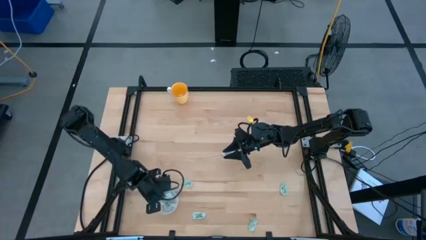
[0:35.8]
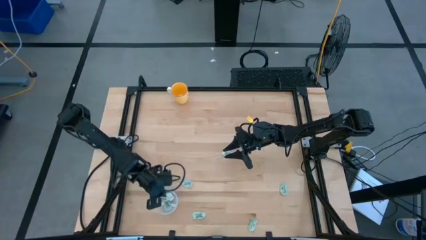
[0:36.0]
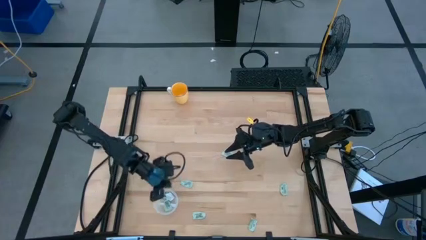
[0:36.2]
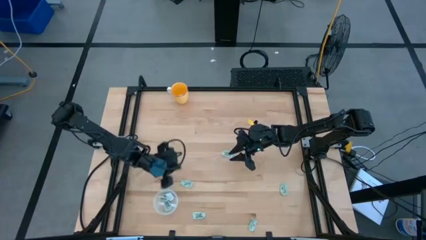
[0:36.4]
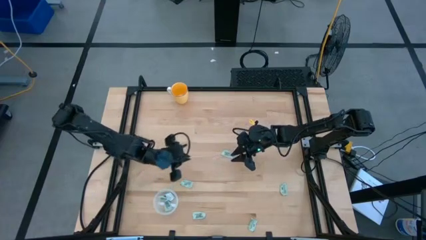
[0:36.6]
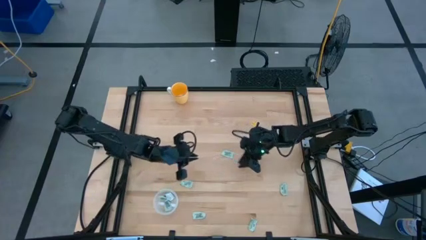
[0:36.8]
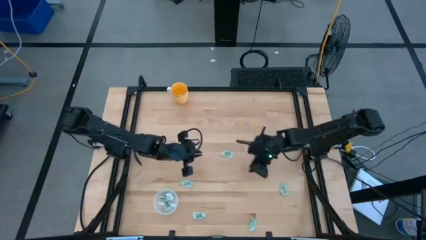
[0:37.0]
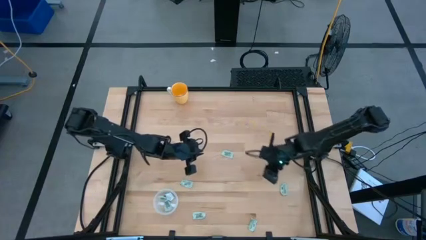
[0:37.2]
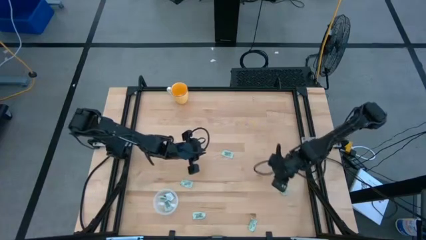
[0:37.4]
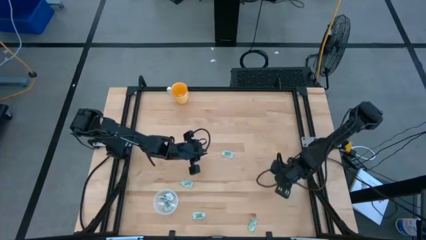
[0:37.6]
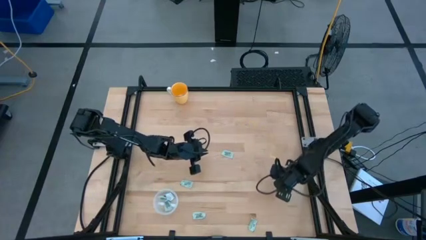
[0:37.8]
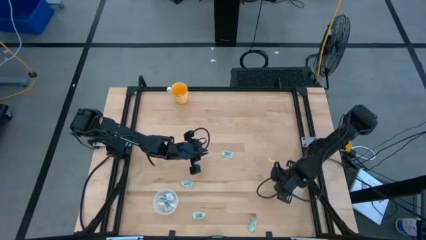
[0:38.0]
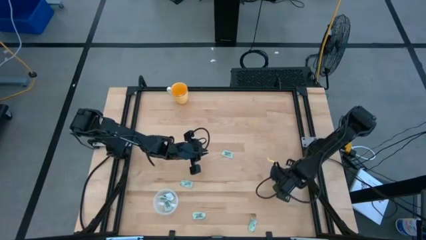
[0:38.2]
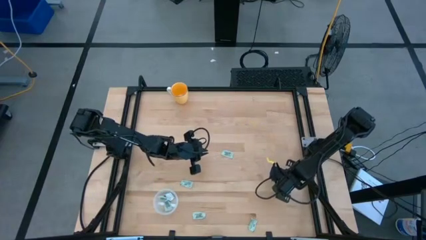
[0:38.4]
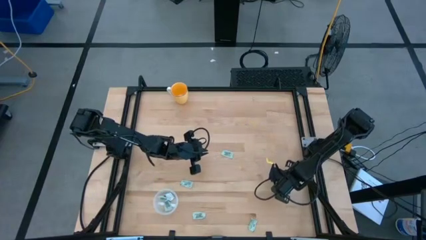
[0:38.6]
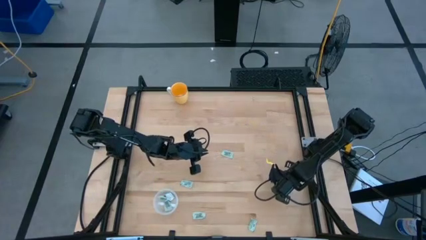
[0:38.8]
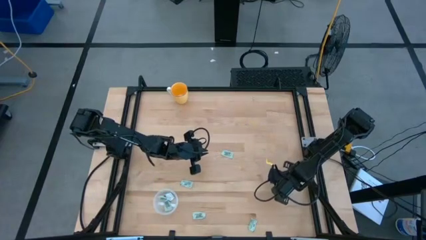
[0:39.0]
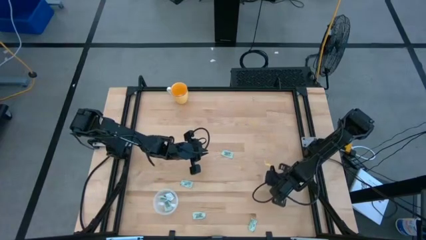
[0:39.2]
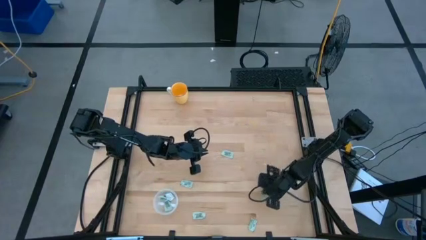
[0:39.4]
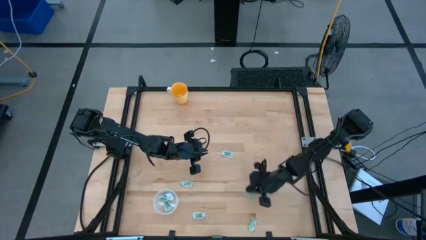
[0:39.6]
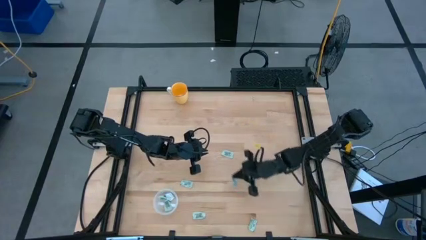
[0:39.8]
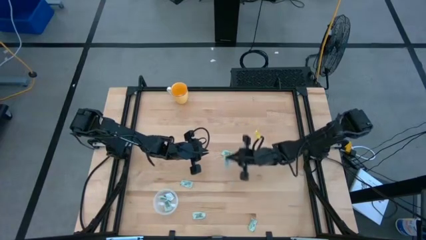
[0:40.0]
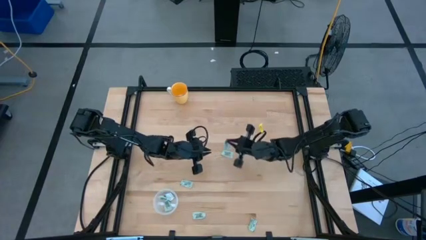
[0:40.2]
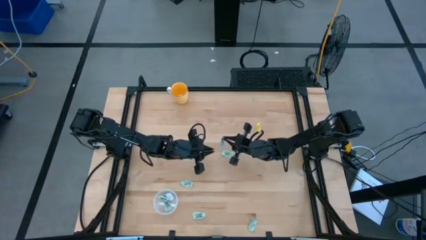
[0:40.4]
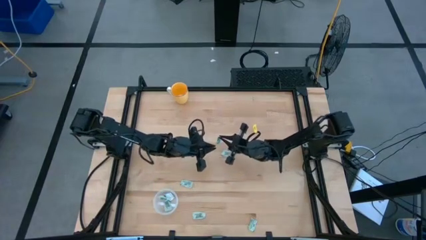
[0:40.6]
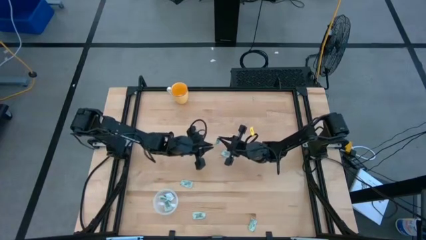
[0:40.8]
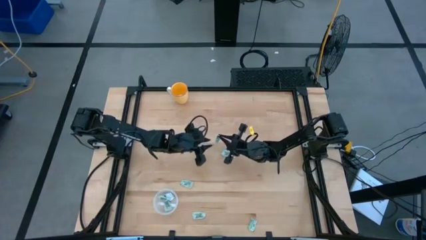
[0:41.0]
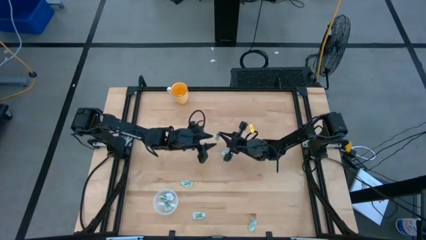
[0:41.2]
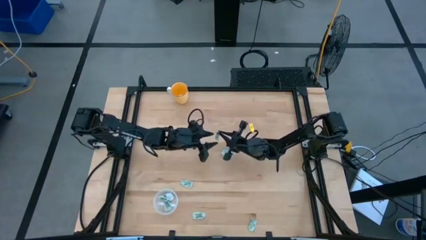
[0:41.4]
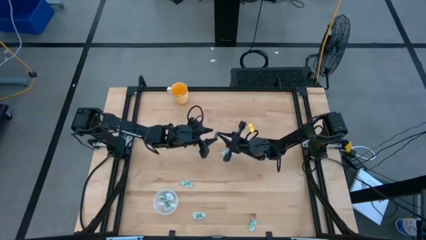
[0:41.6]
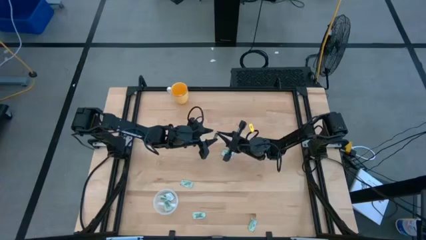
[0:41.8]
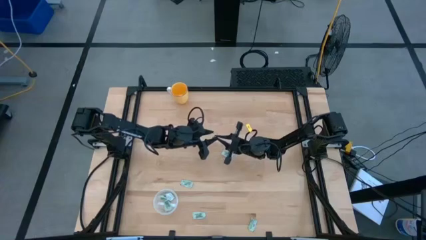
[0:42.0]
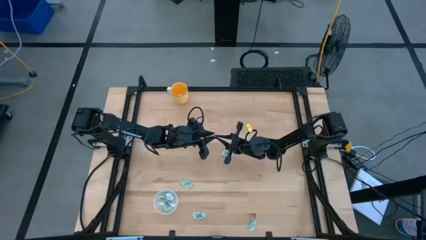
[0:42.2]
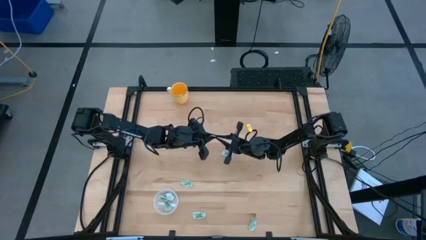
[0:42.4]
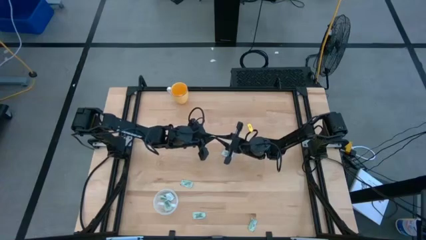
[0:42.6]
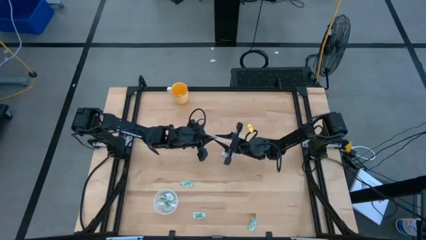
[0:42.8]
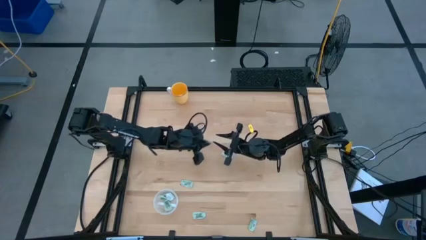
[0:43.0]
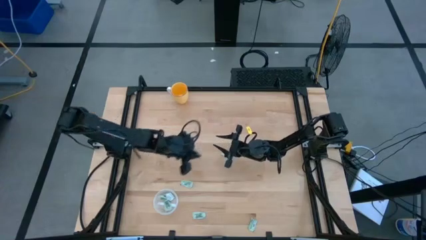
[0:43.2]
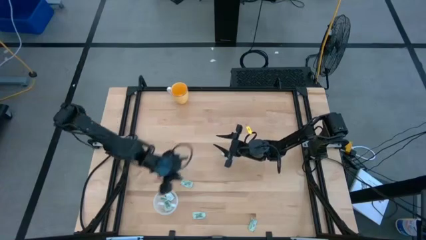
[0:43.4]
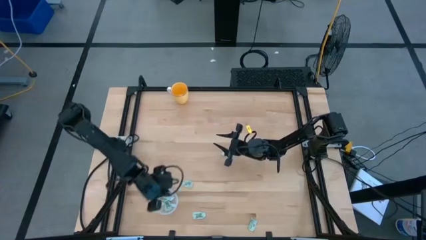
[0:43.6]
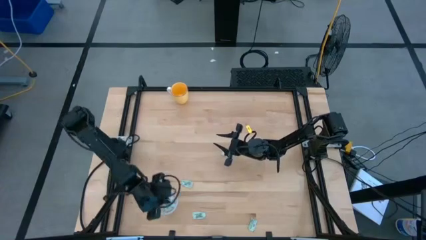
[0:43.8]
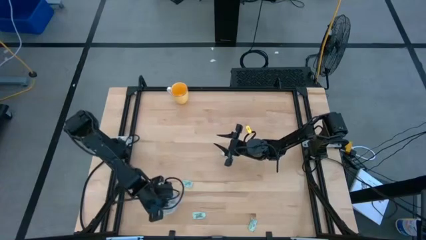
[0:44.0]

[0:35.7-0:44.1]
Task: Pick and place Stevia / Truvia into bins
Put the stevia packet into the transparent container

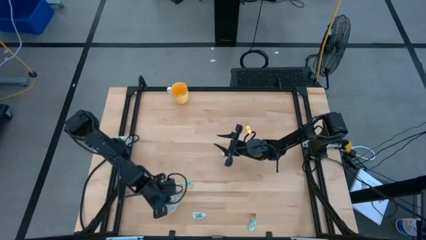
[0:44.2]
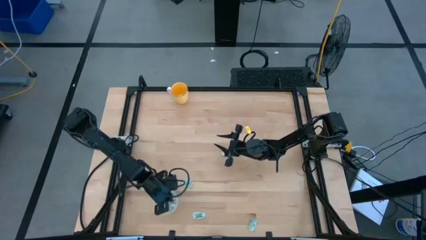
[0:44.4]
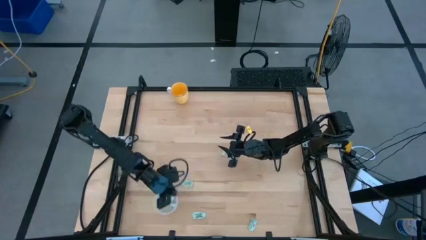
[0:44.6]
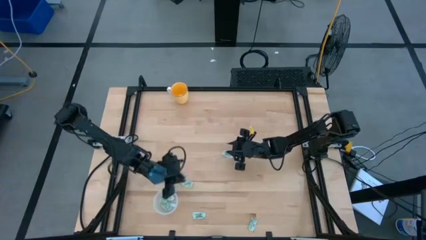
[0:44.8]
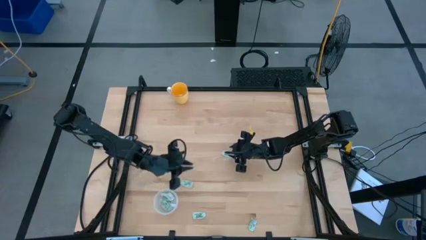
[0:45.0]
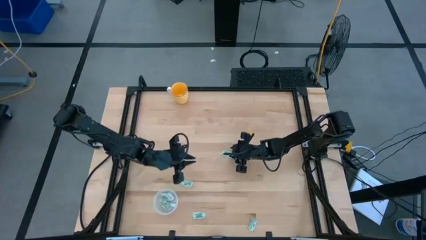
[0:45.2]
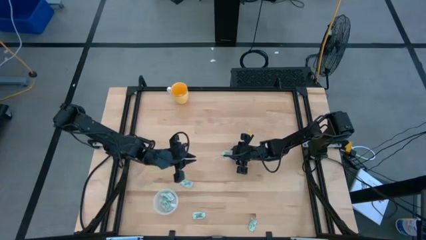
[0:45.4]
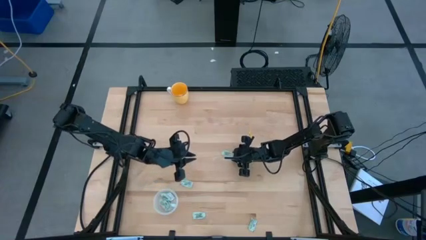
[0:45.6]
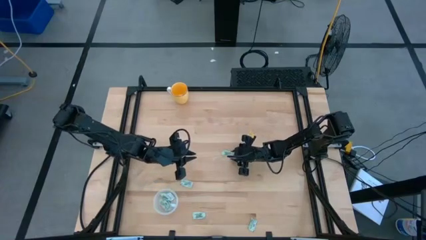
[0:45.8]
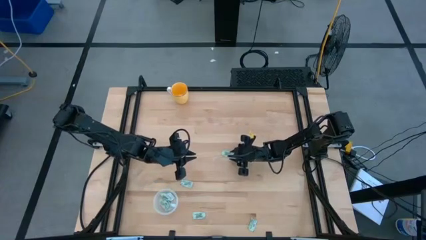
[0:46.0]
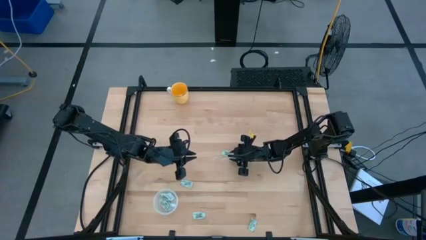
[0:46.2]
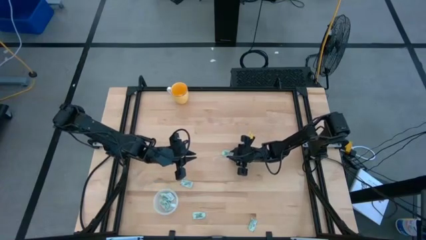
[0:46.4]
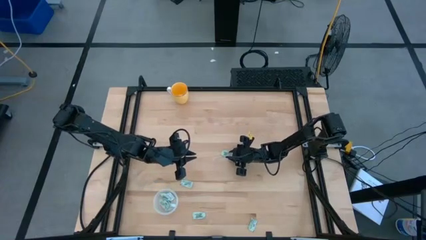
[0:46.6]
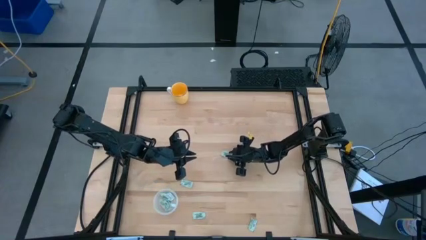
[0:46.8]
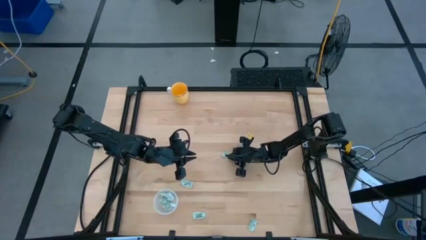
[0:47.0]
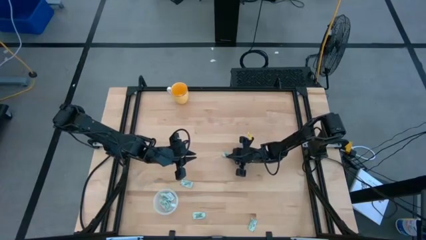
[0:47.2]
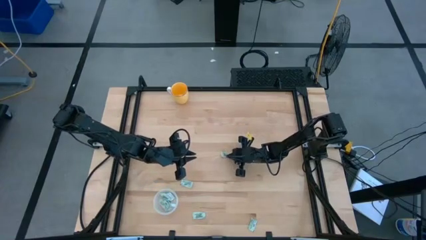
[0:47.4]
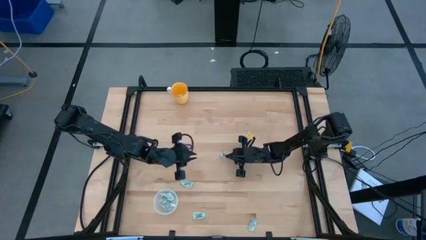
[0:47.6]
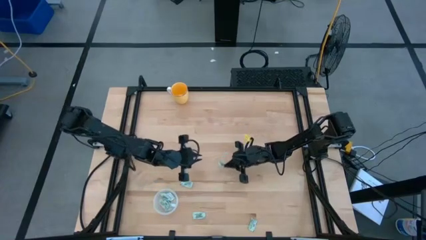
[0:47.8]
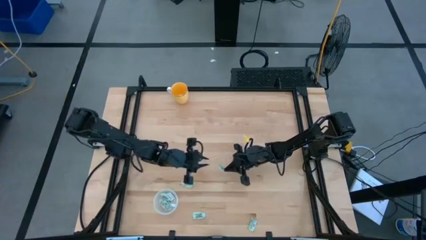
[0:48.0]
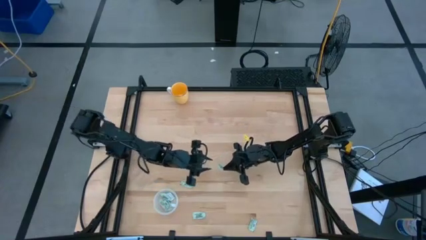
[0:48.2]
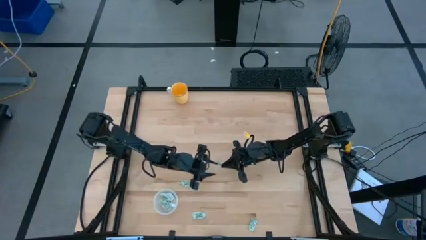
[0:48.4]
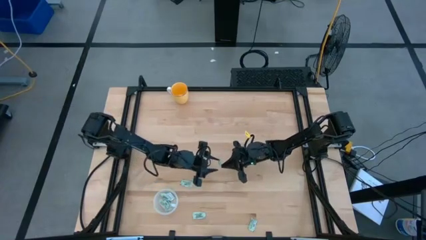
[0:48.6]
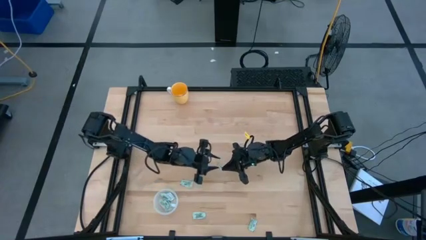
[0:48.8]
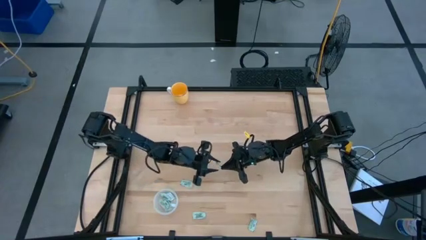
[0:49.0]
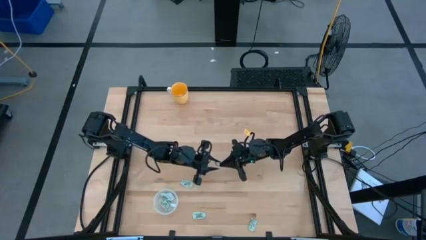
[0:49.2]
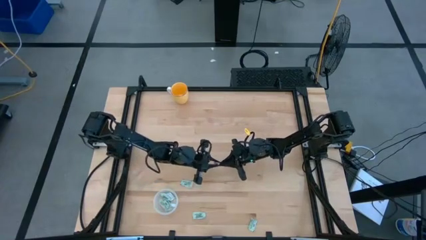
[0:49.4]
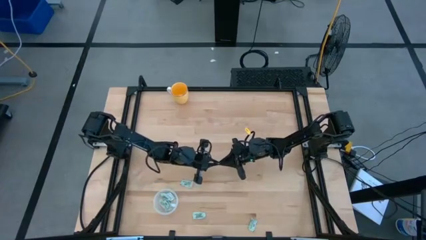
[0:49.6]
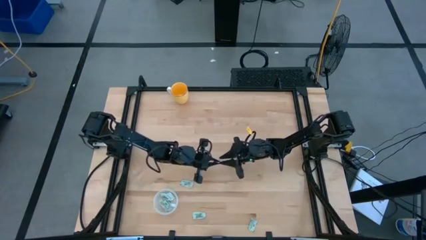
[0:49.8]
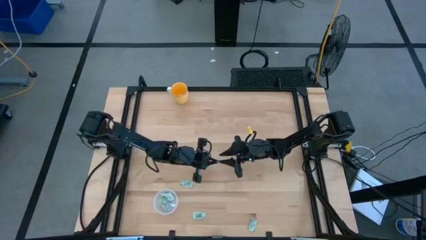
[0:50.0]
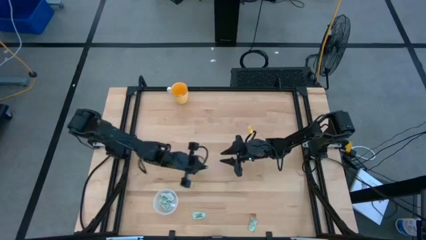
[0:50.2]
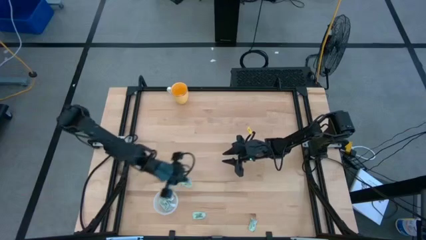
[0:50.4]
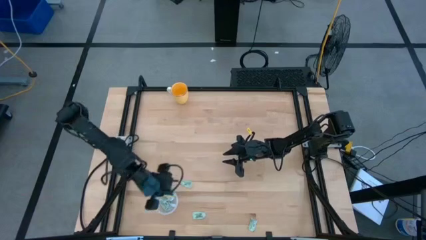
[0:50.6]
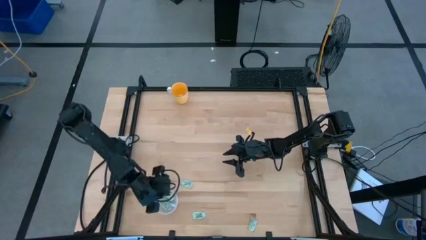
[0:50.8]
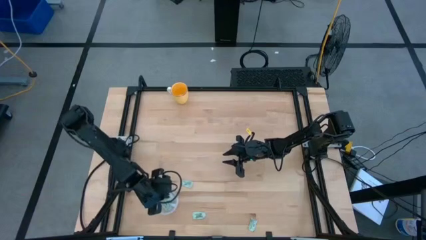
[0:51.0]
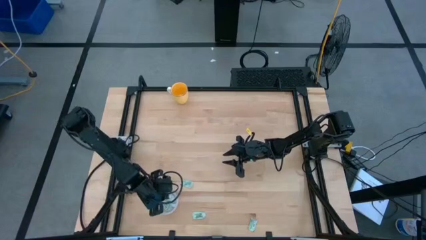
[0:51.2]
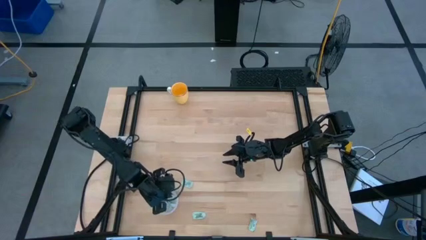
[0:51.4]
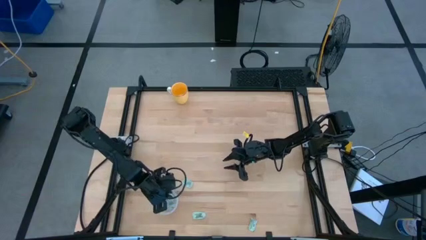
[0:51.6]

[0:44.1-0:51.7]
Put the stevia packet into the transparent container
